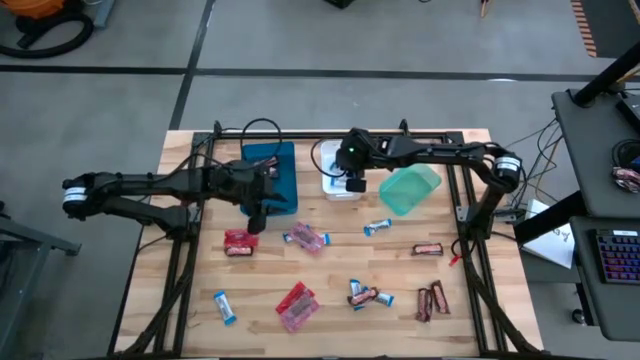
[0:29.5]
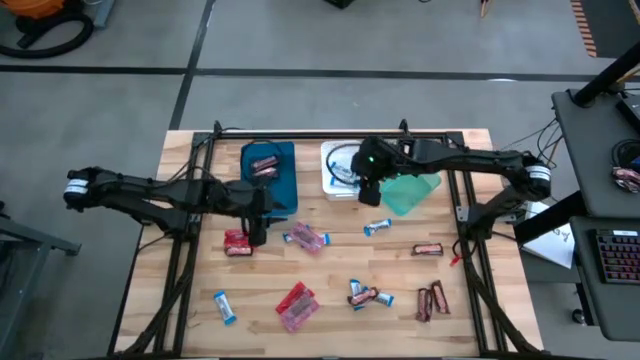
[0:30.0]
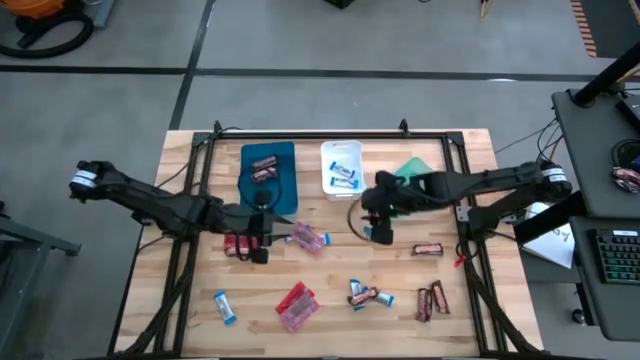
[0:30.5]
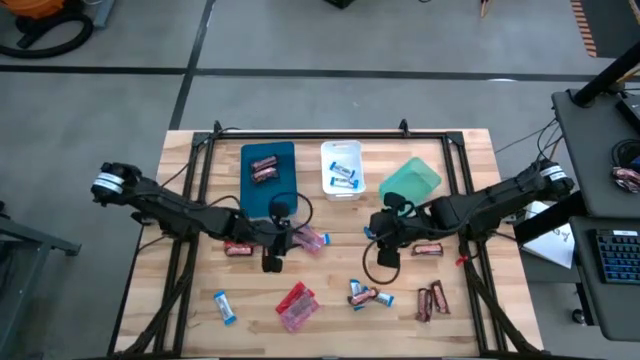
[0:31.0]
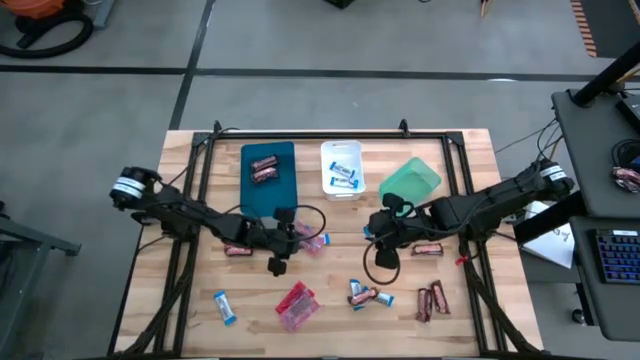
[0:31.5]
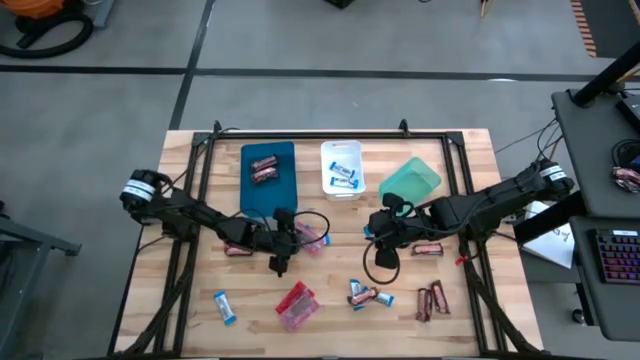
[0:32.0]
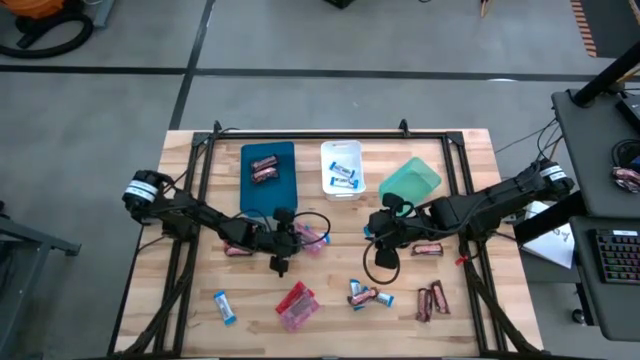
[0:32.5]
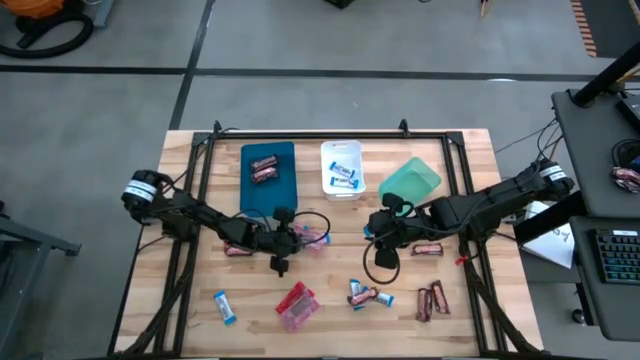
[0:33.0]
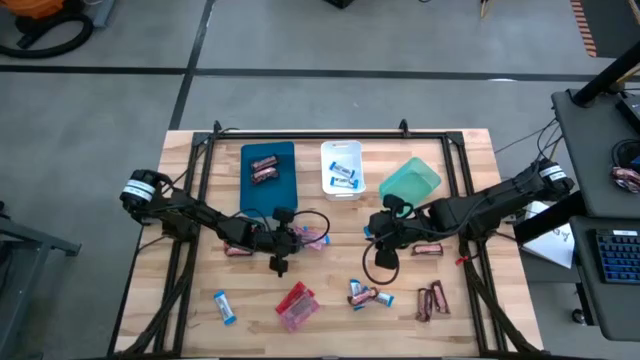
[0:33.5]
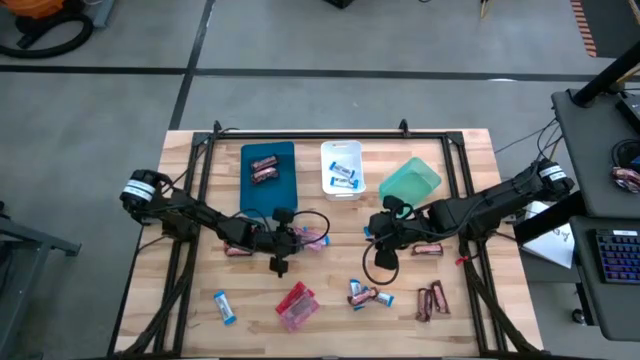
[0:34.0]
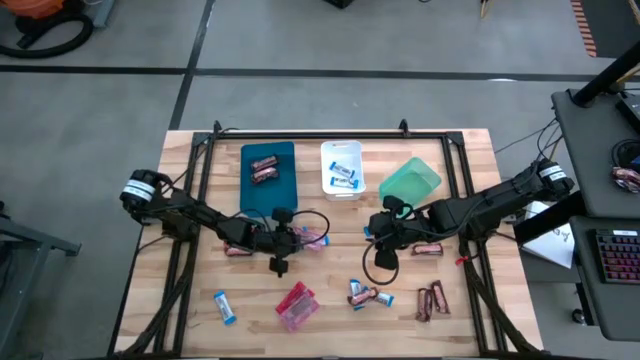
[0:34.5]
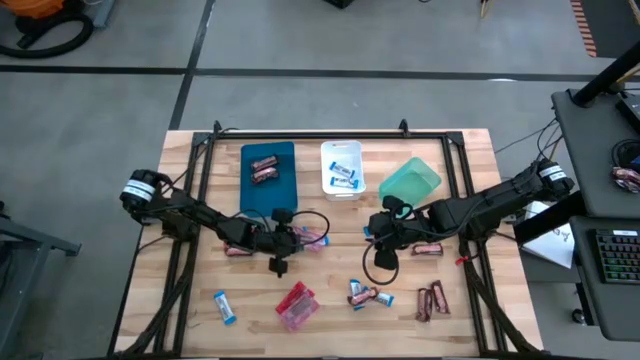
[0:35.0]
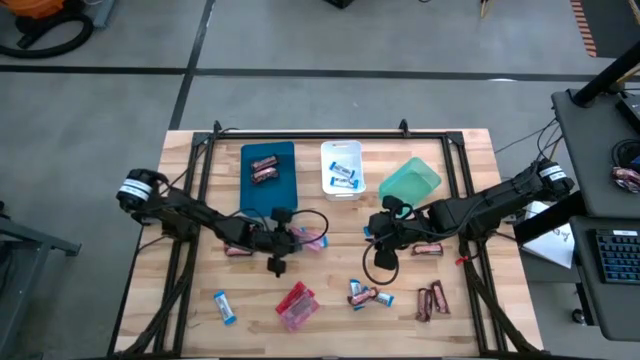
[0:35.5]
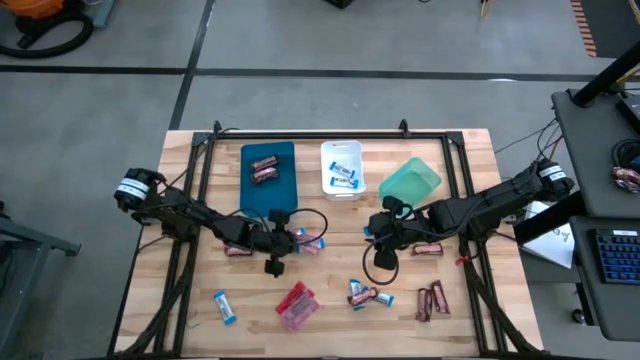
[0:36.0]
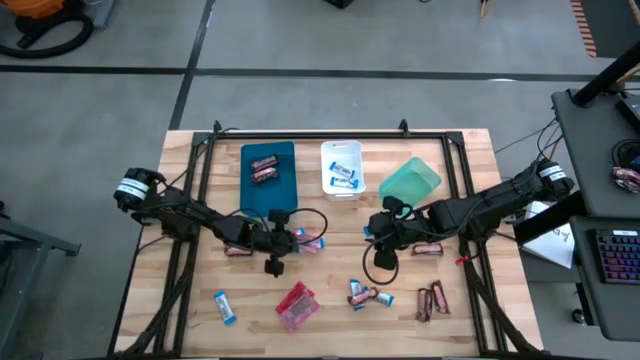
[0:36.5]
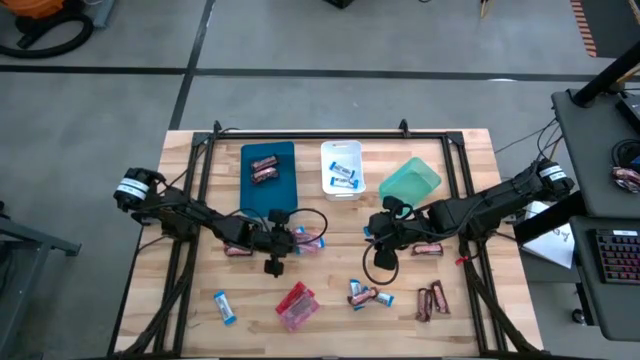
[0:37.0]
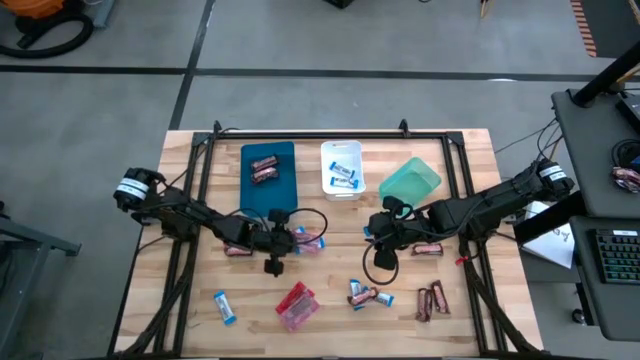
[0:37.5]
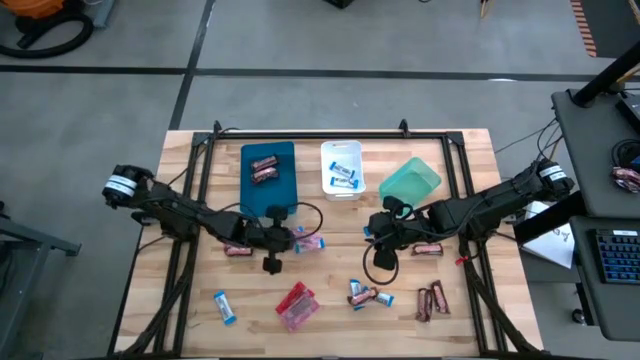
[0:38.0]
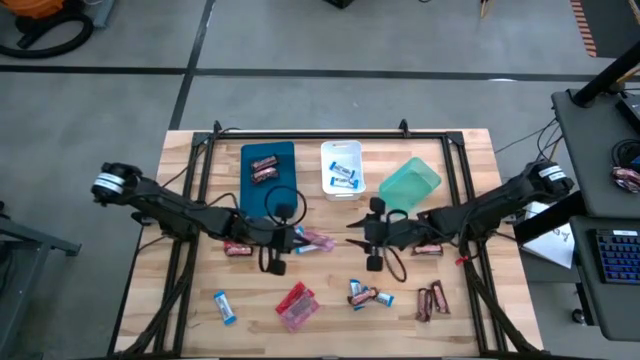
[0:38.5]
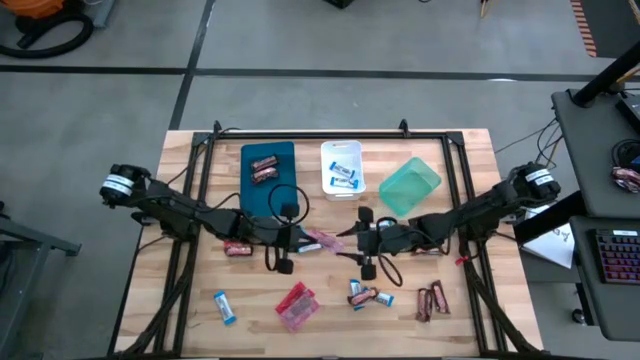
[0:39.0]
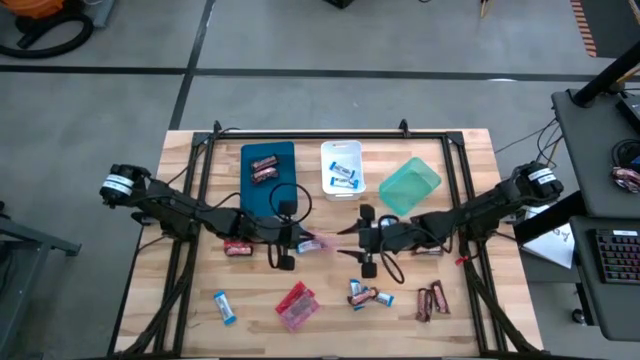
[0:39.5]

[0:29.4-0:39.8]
Task: Sort candy
Put the red candy into the green bin

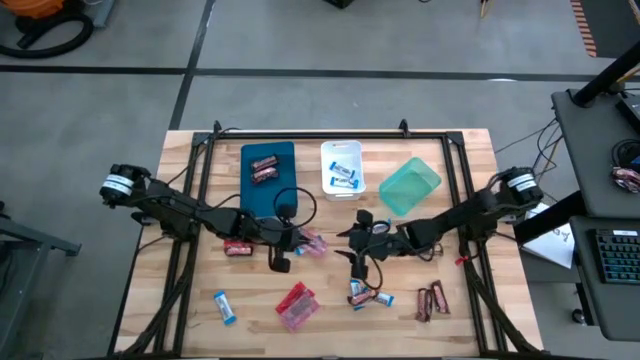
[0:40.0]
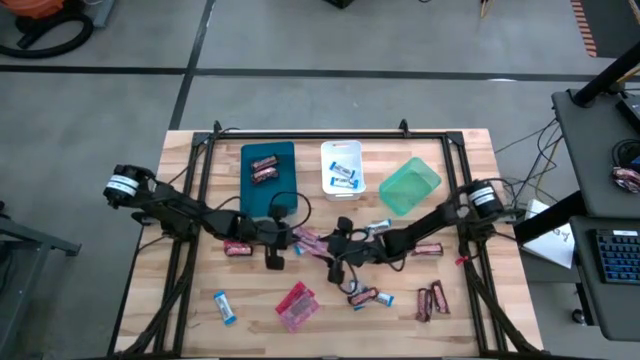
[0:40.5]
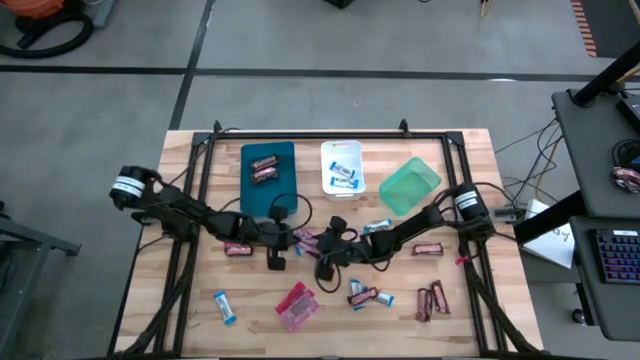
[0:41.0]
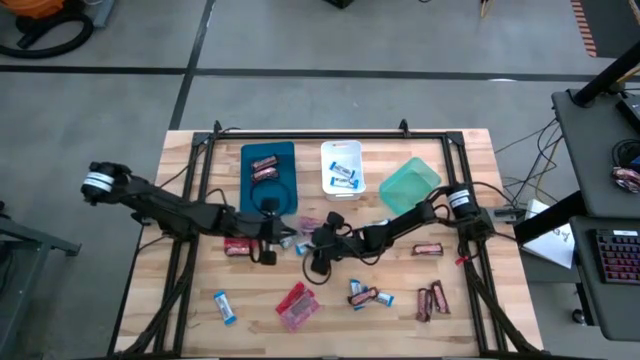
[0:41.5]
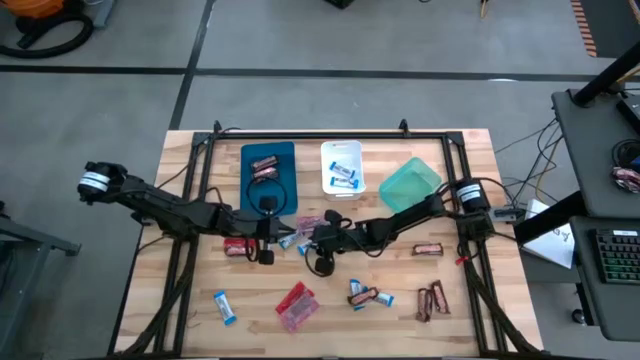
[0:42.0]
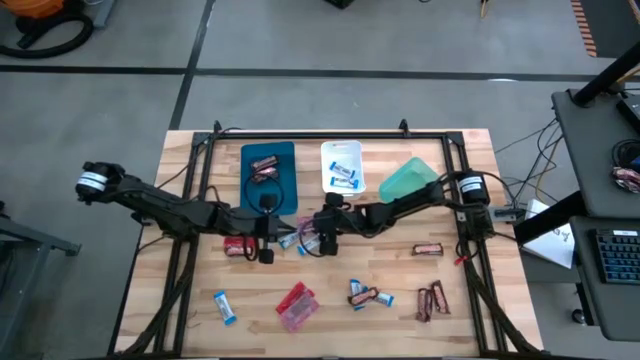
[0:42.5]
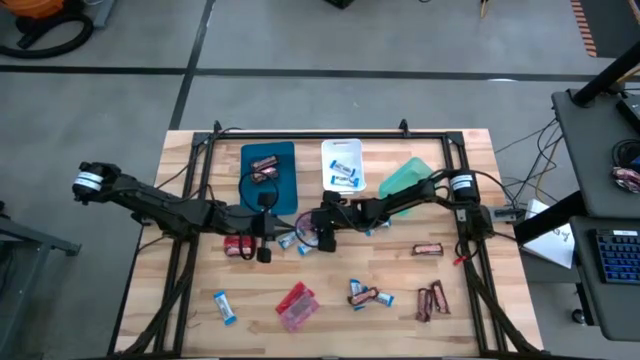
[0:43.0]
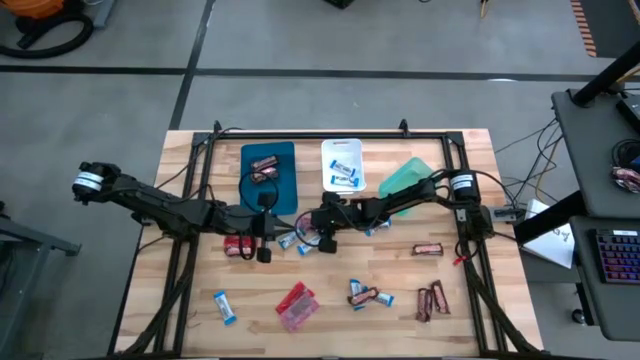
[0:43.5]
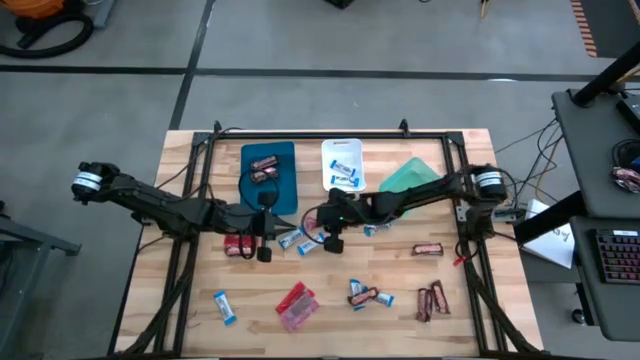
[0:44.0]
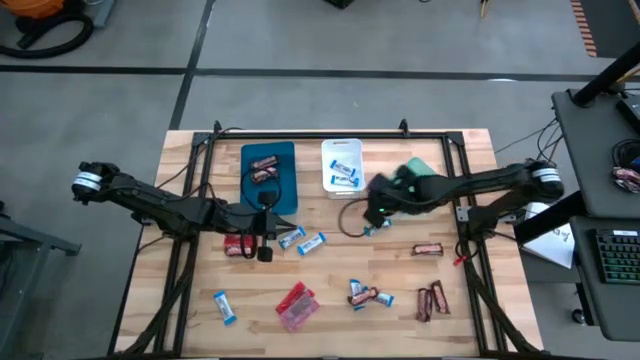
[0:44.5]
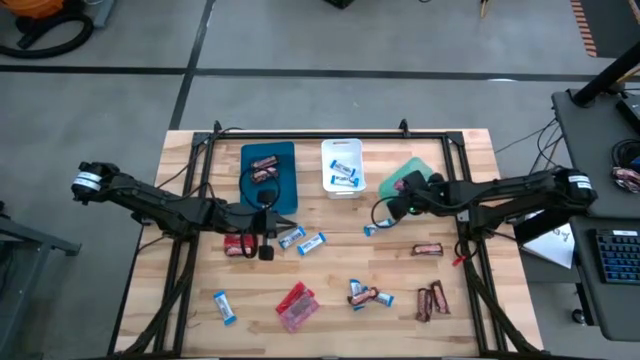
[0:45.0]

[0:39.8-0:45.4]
Put the red candy into the green bin

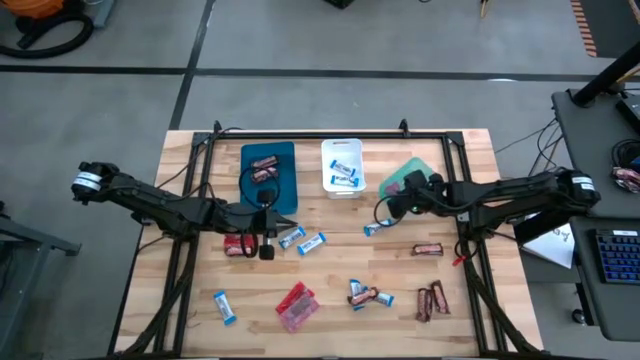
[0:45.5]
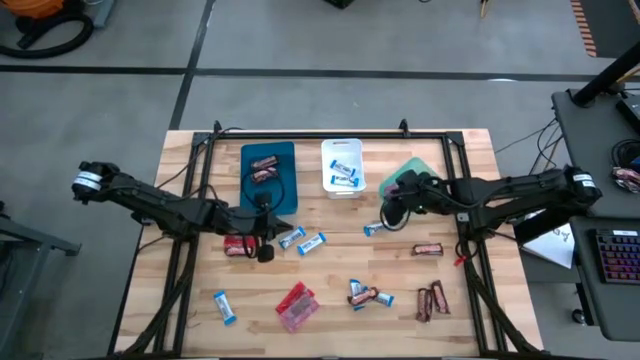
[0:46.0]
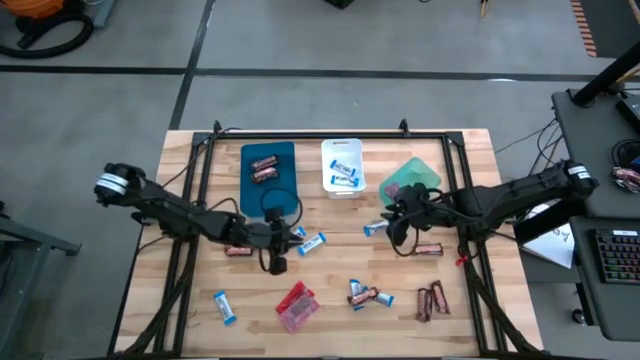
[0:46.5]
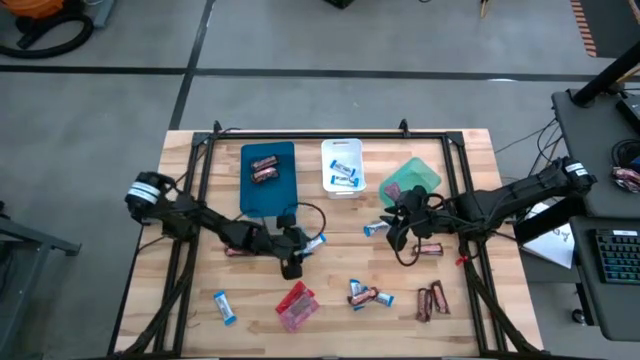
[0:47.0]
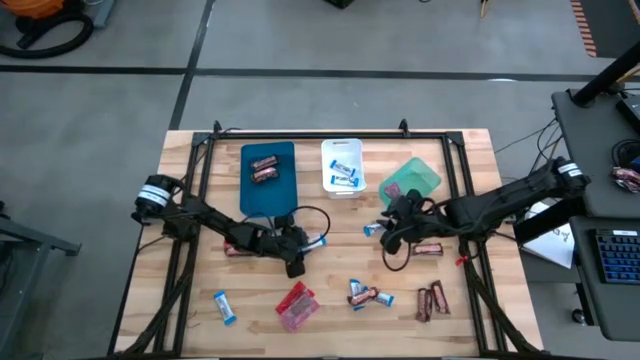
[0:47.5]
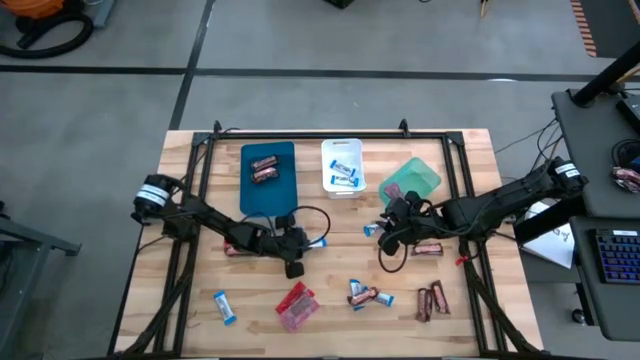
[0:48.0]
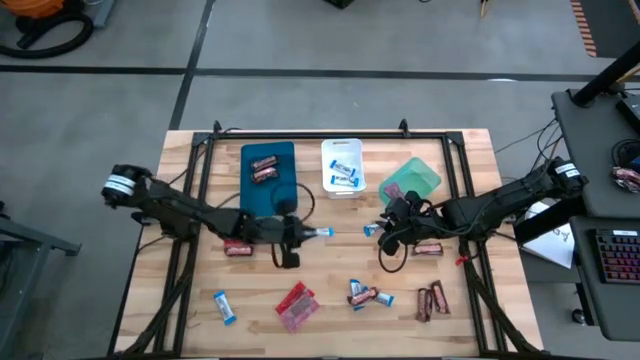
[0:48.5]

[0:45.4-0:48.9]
Put the white chocolate into the white bin

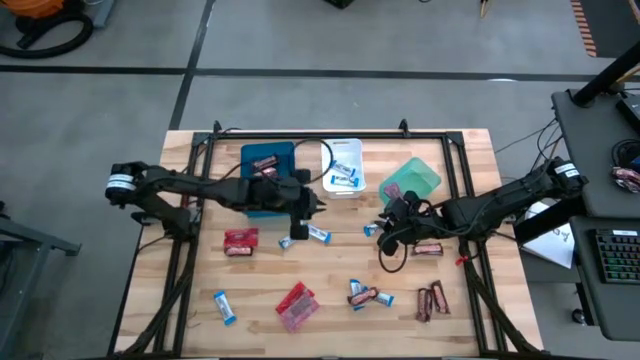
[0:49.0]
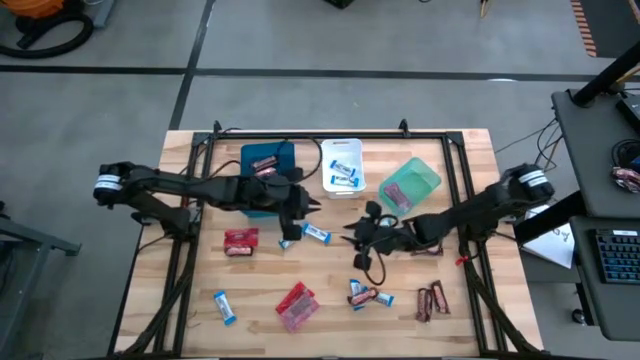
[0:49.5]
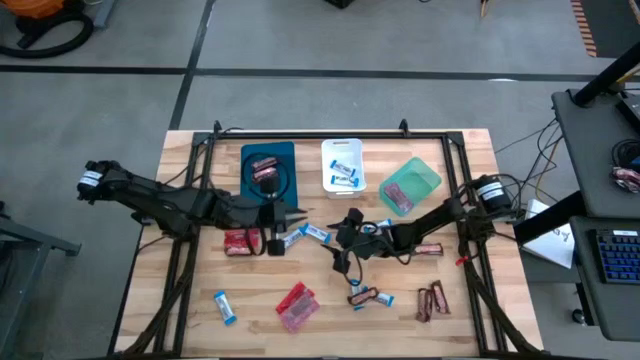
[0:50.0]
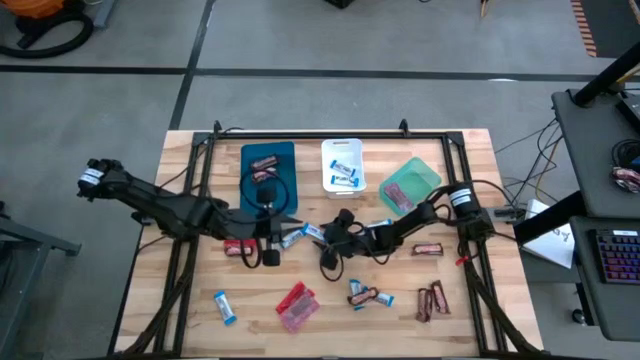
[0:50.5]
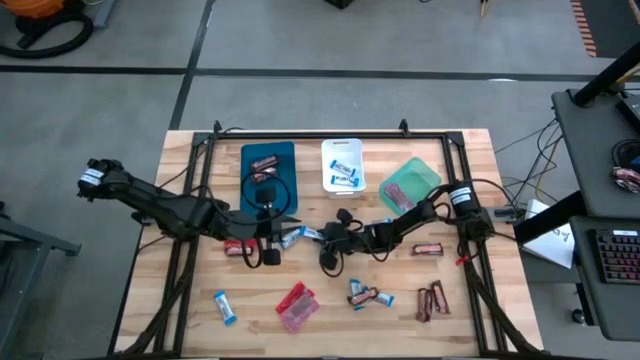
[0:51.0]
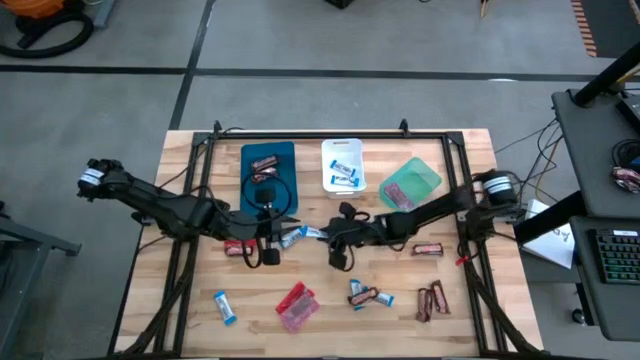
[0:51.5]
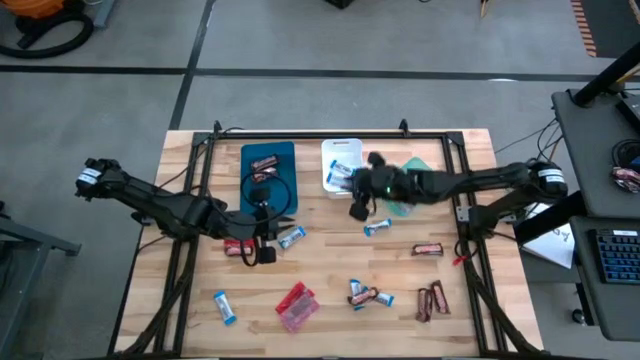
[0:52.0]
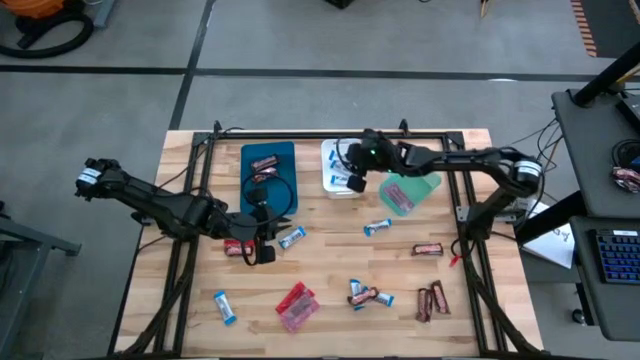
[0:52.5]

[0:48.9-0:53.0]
Put the white chocolate into the white bin
